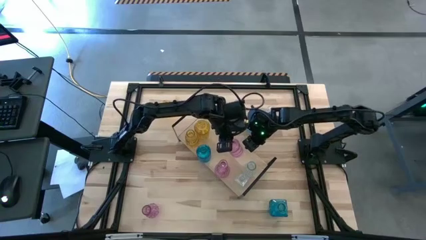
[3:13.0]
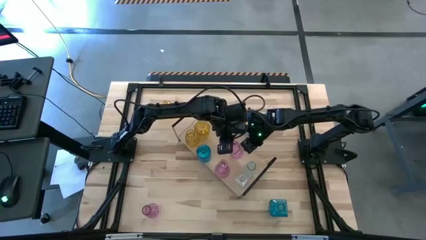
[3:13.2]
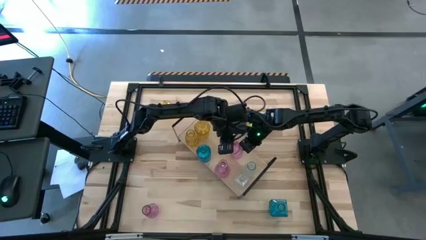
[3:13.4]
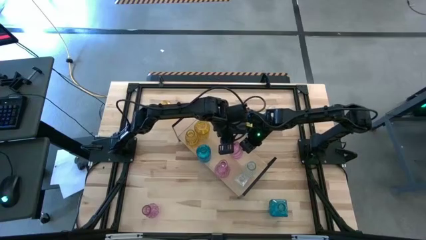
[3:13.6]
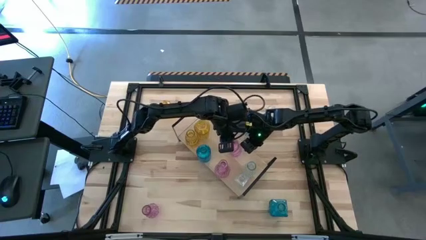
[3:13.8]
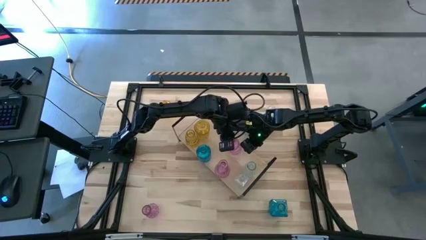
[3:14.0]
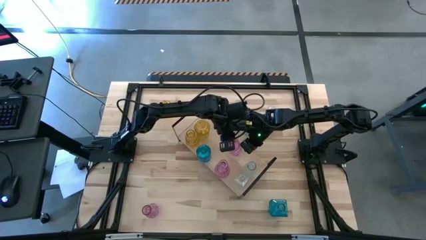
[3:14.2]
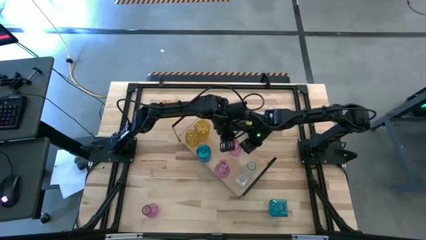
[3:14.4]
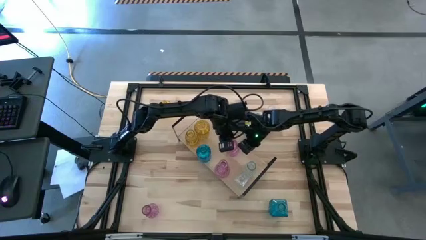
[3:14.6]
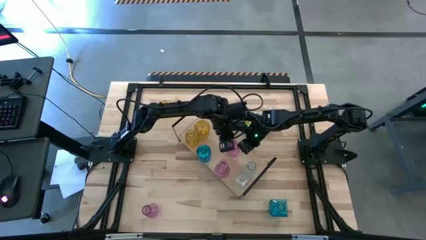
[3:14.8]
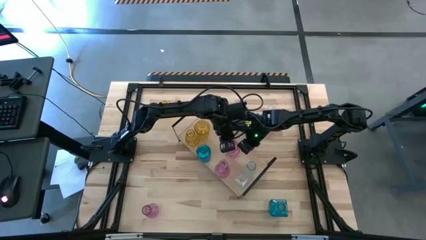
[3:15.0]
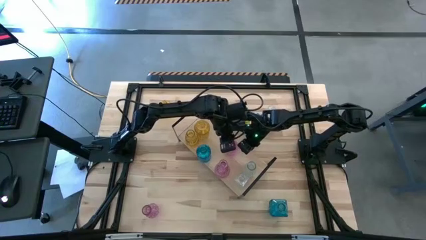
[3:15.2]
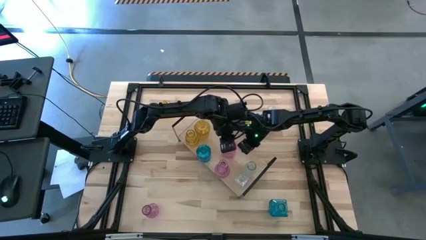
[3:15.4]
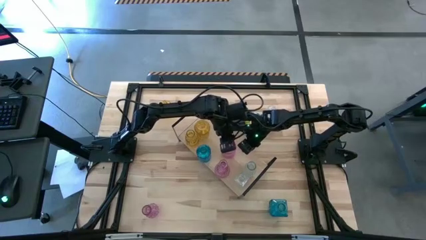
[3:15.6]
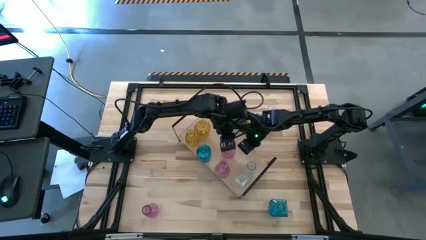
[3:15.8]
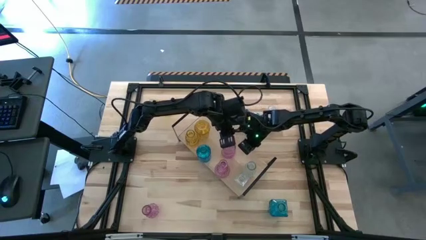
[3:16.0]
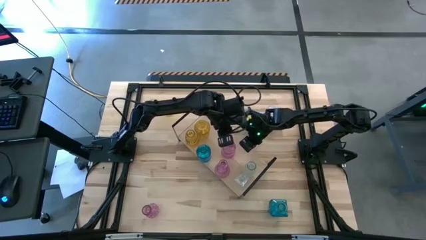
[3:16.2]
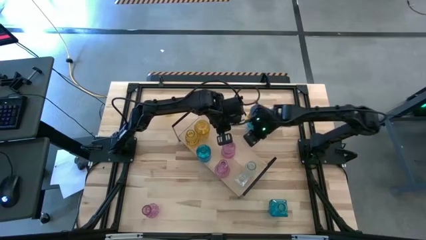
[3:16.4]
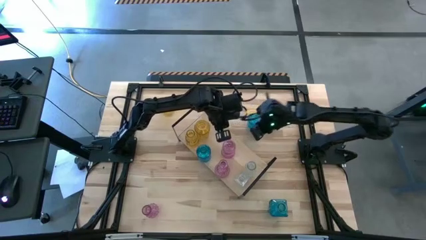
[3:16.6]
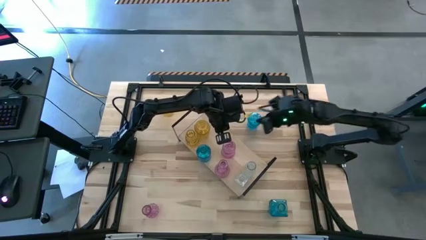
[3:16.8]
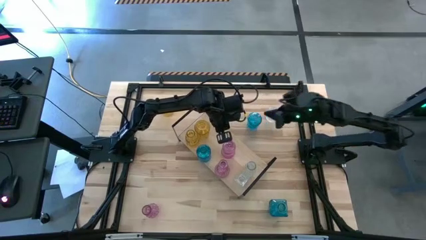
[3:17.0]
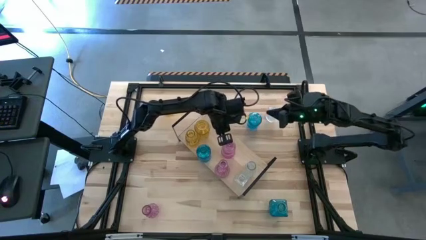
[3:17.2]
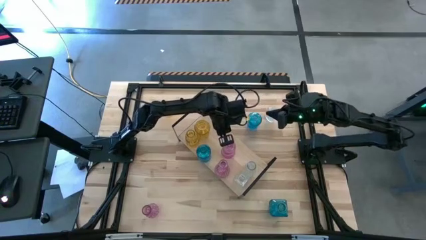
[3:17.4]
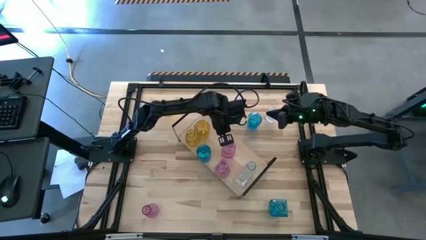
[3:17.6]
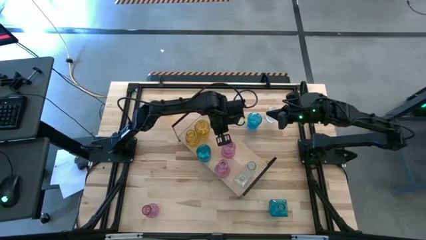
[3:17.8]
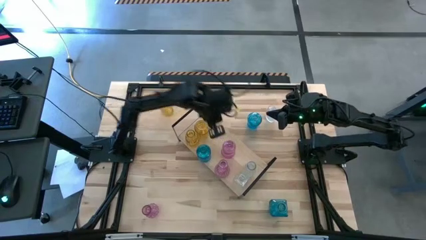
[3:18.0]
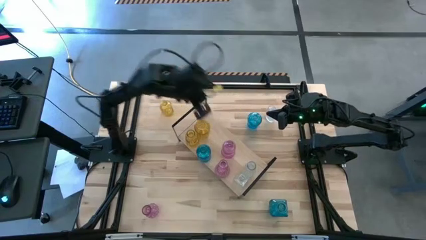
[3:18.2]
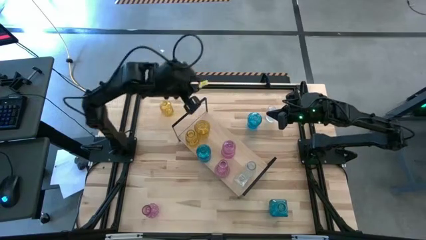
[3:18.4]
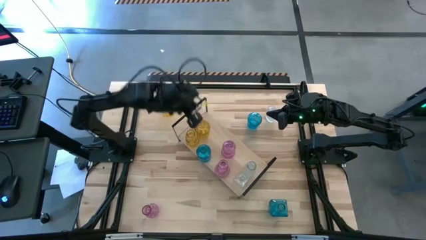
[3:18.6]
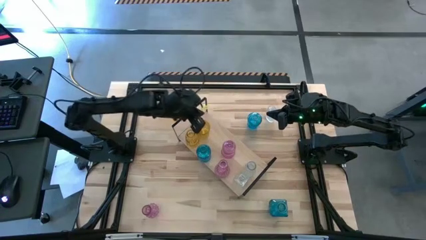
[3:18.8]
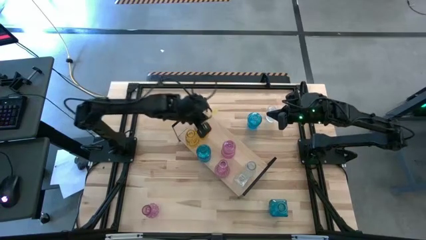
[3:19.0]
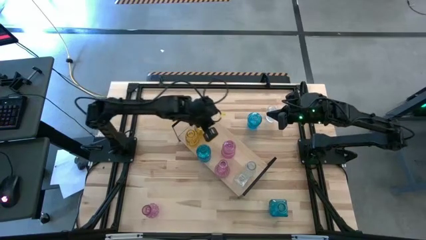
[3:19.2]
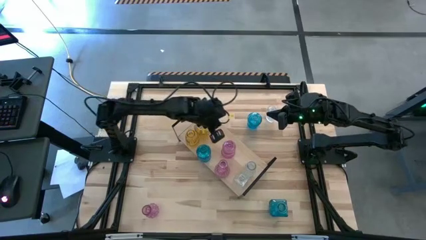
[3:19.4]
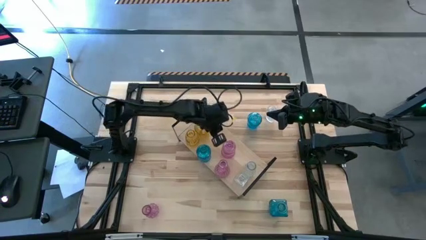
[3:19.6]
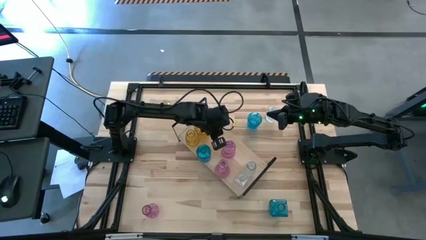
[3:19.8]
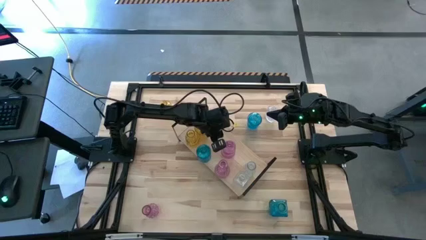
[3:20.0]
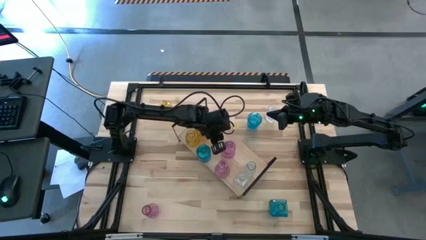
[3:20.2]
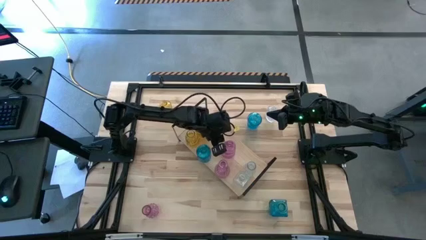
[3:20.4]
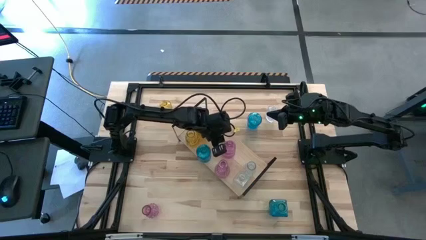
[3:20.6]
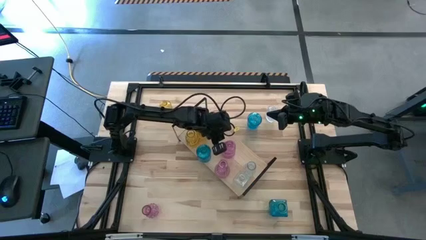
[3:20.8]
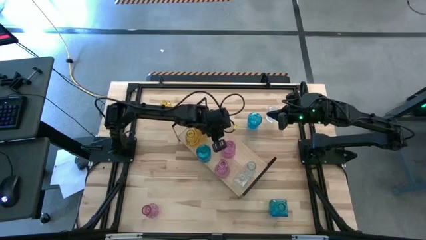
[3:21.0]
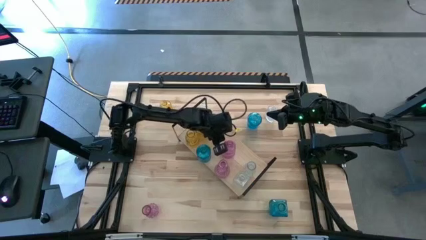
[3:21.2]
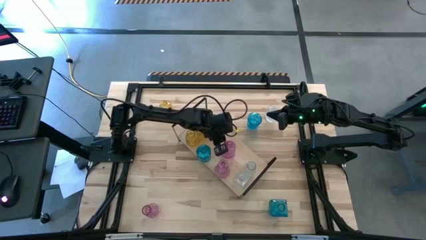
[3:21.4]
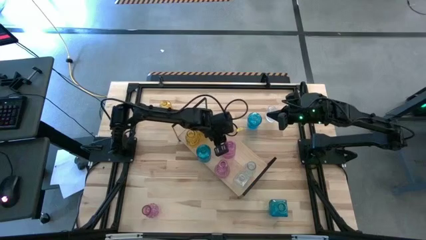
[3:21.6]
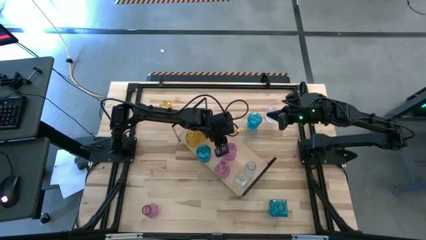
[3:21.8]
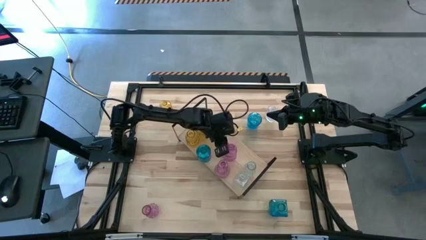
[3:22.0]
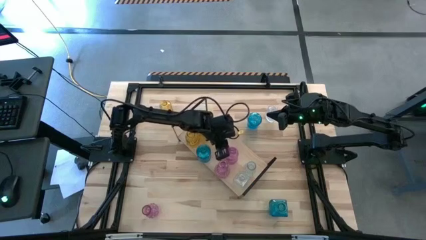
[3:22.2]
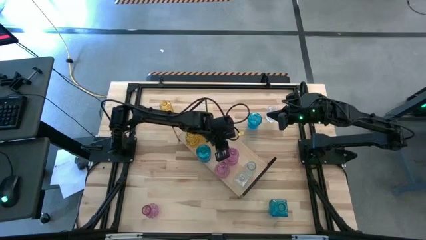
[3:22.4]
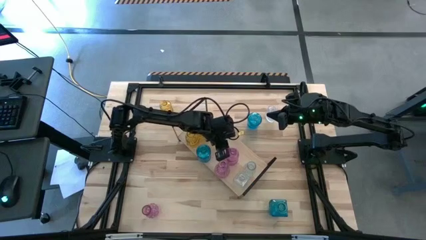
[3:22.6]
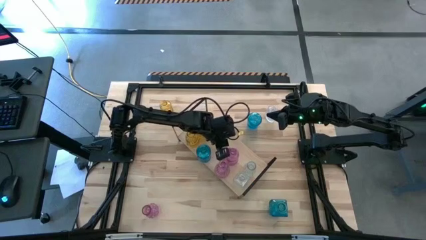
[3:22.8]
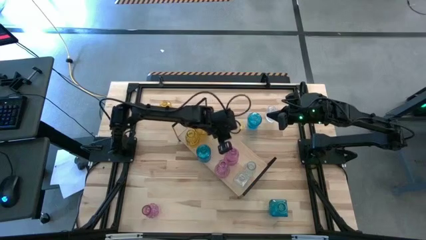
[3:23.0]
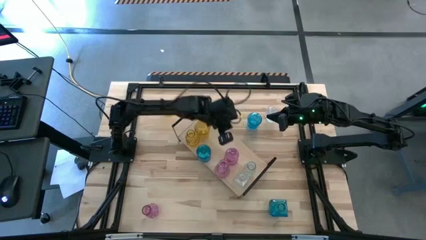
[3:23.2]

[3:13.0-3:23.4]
Task: sort vases onto shelf
Put the top pink crystal vase on the shelf
